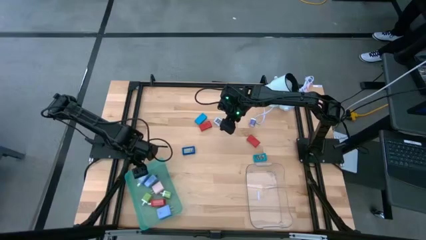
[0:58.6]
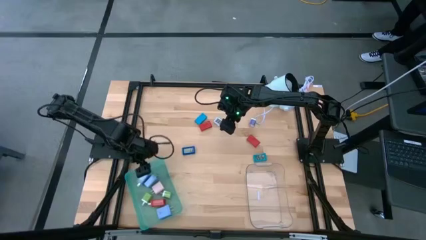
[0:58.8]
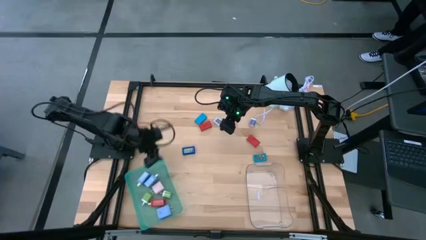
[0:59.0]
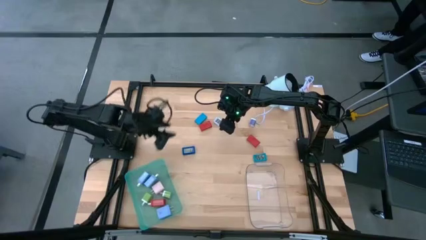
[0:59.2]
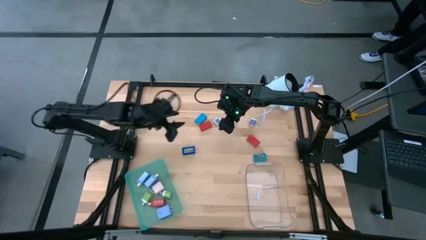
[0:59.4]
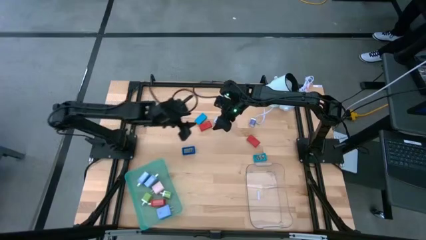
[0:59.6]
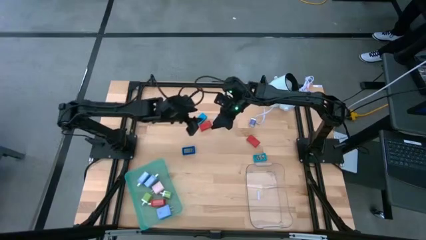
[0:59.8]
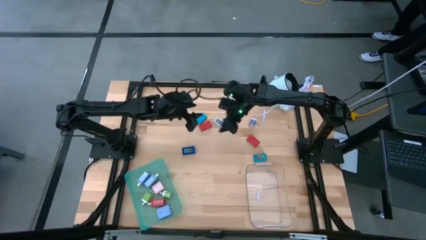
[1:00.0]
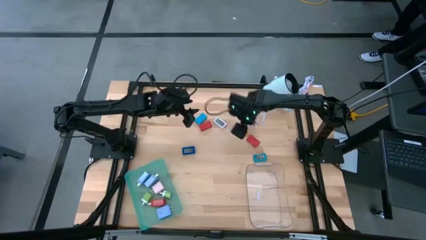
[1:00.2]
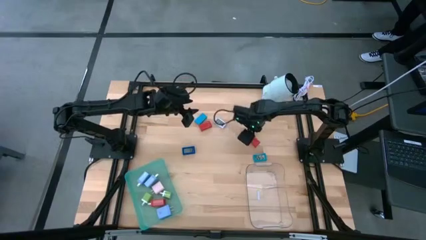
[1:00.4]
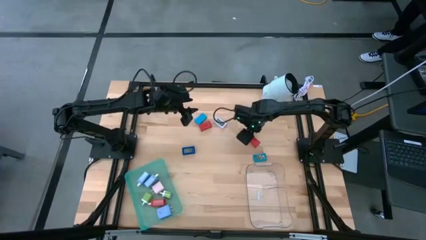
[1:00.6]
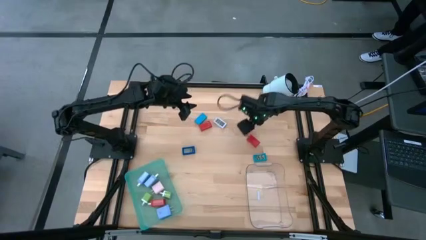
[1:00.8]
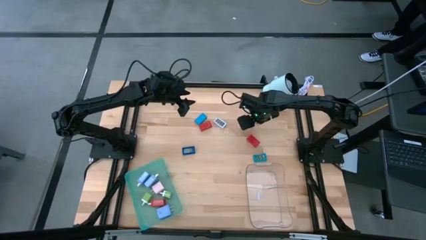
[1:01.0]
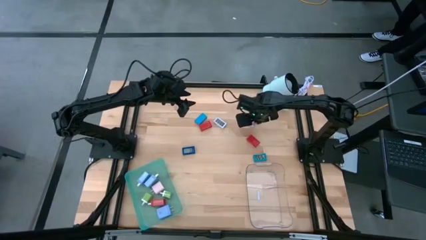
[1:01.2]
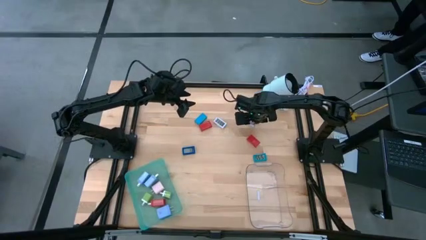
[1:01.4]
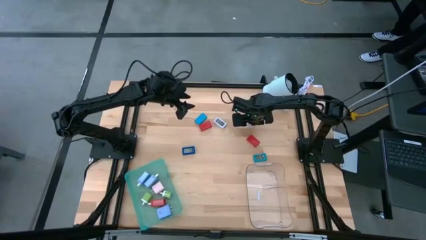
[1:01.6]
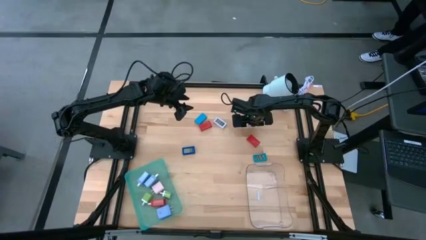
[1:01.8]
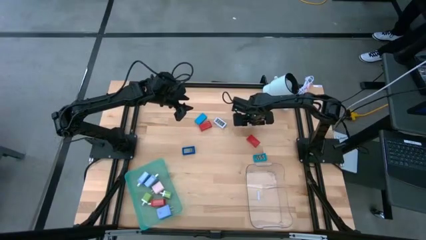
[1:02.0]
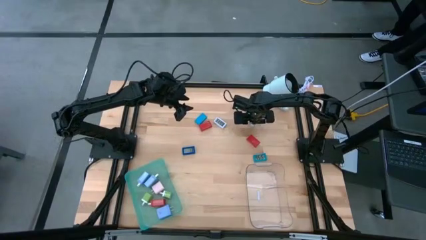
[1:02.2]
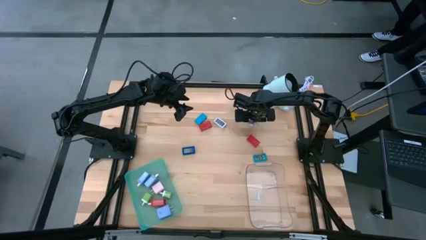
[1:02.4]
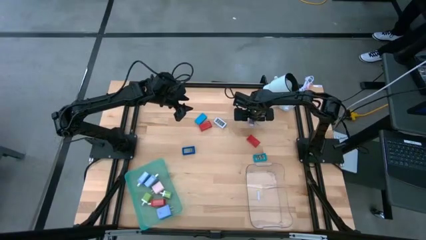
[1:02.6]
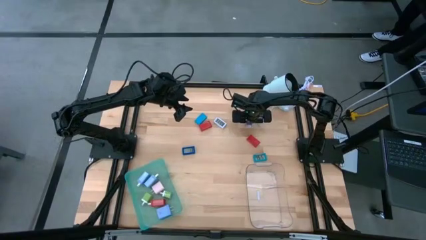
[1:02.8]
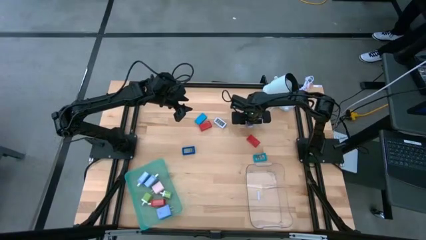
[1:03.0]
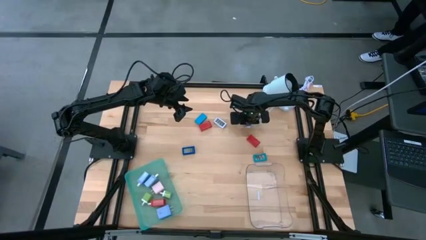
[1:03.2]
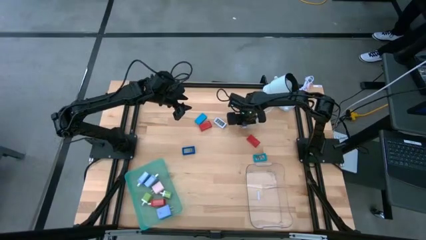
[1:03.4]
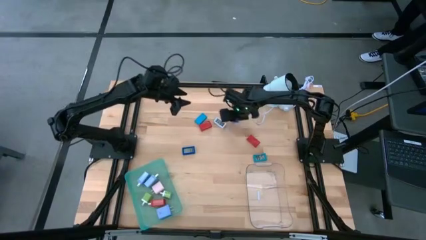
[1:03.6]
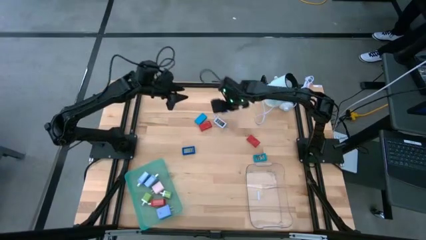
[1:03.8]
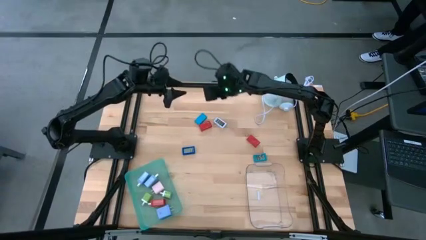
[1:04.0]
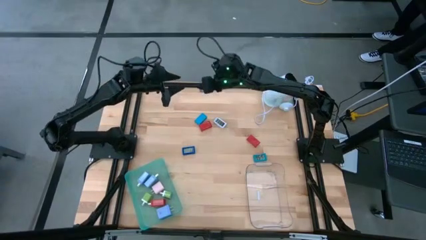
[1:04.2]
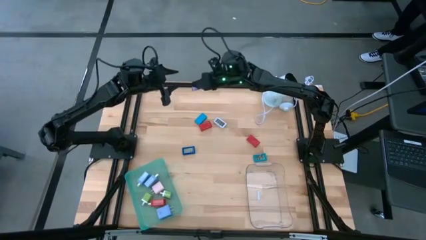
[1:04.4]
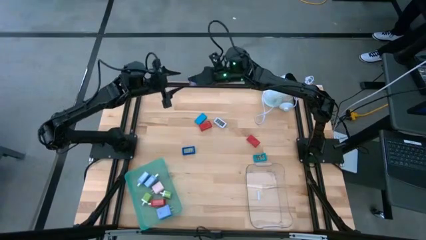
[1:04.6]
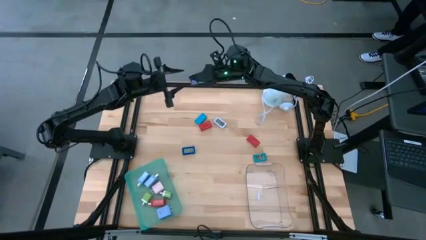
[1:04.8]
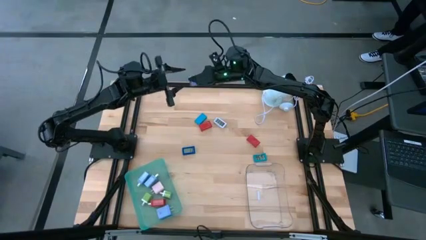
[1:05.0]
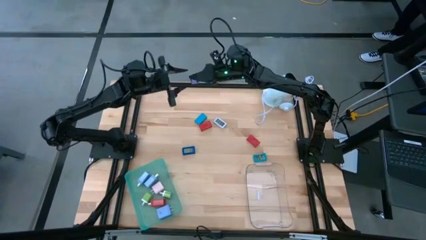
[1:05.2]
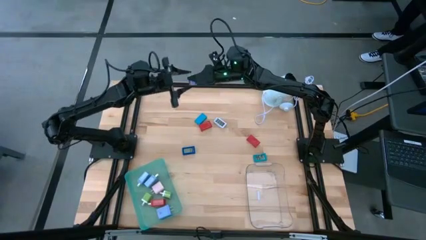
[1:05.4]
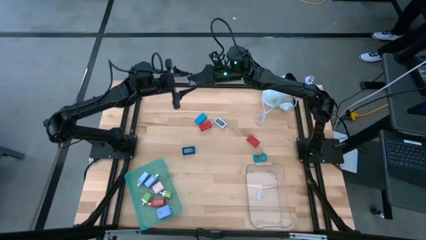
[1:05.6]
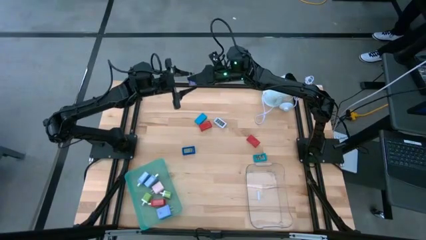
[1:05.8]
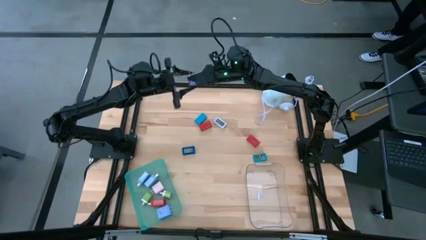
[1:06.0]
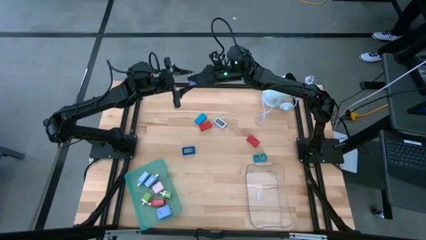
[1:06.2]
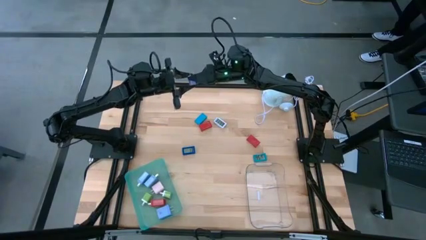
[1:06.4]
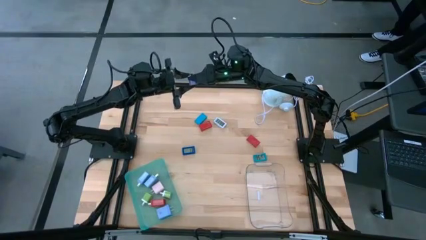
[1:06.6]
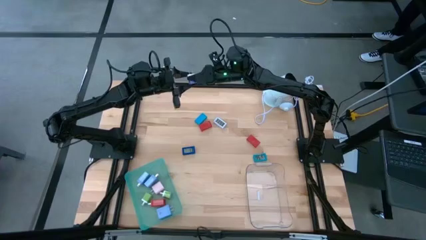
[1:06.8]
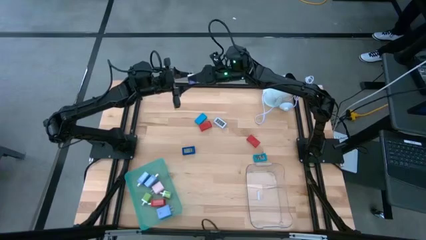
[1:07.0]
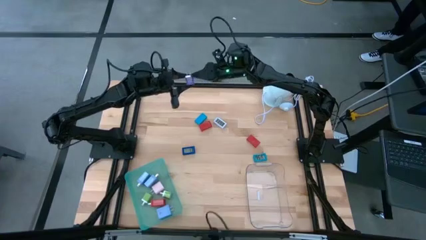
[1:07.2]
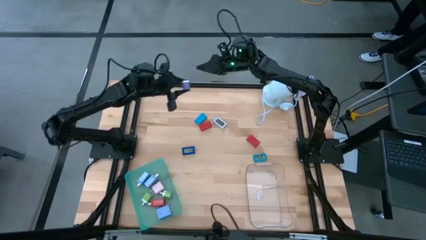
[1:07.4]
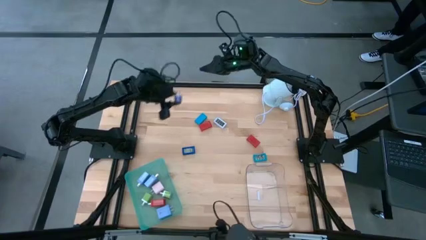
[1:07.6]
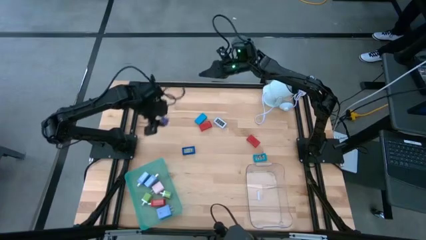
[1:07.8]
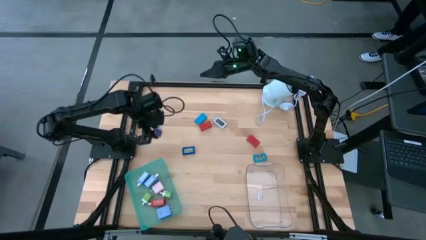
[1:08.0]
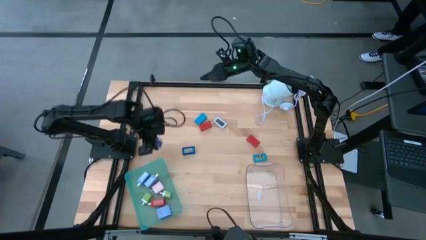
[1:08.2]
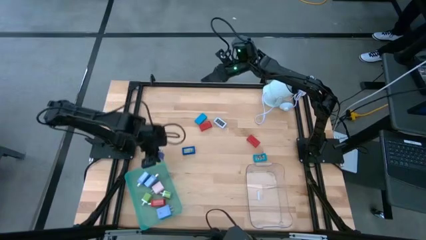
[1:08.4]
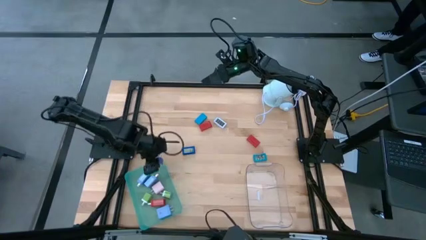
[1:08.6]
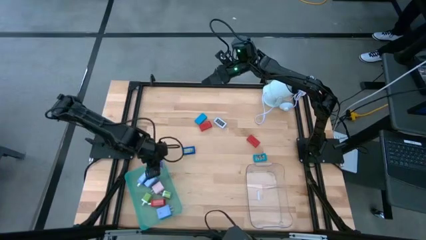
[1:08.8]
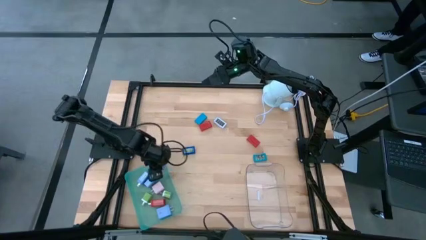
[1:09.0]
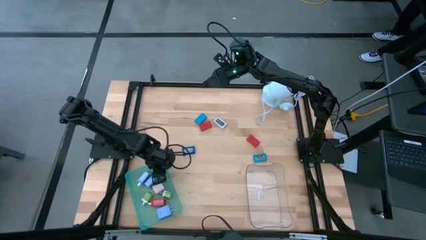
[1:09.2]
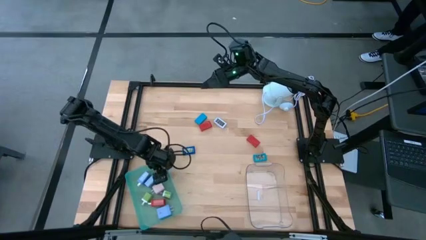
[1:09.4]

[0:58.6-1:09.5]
Task: Pick & Place Office items
Put the purple charger adapter into the blue bin

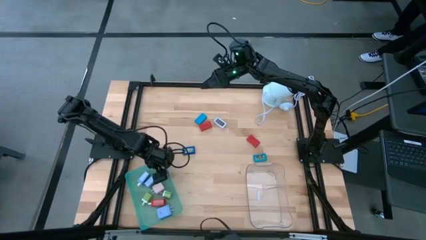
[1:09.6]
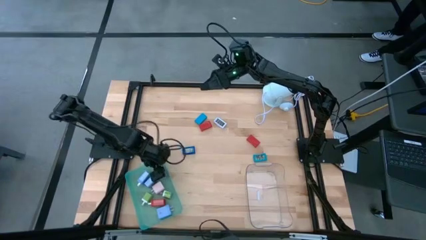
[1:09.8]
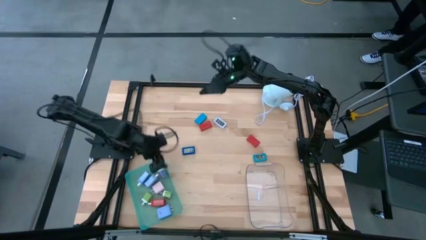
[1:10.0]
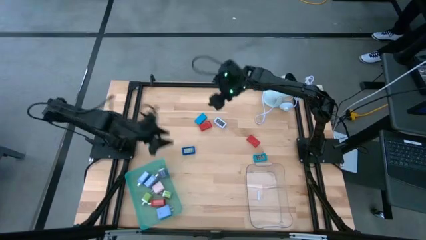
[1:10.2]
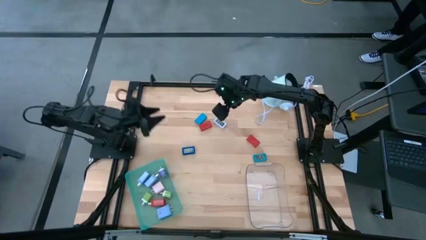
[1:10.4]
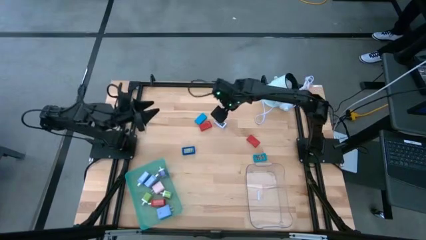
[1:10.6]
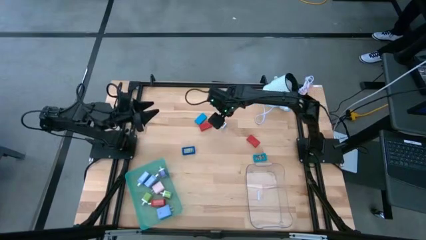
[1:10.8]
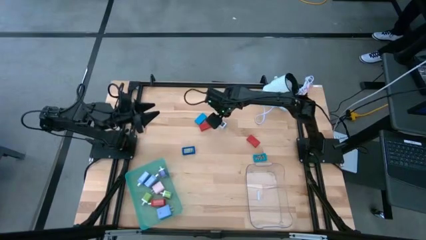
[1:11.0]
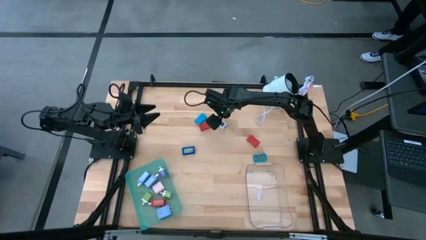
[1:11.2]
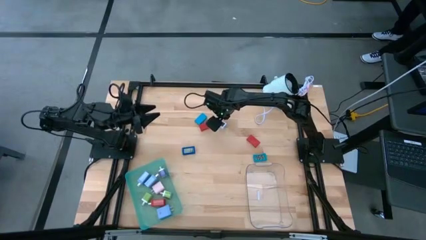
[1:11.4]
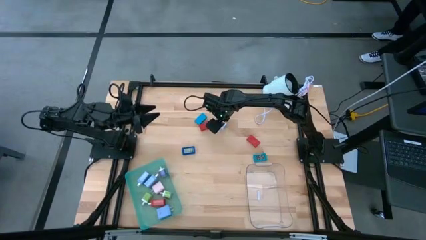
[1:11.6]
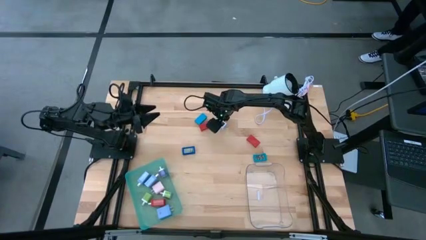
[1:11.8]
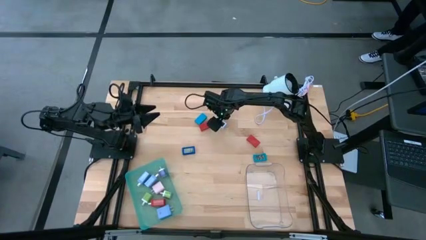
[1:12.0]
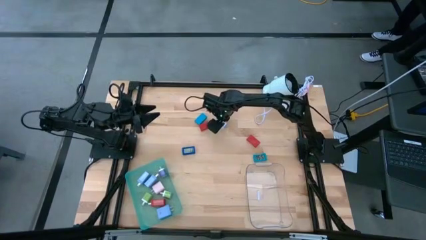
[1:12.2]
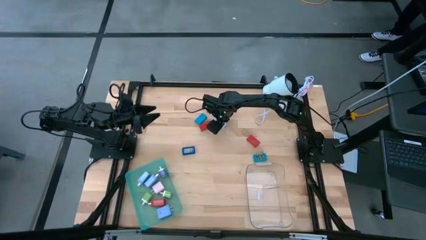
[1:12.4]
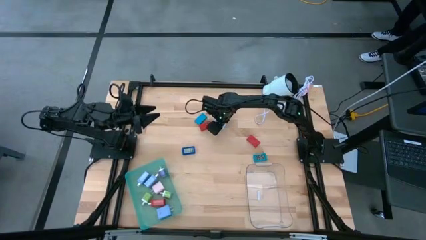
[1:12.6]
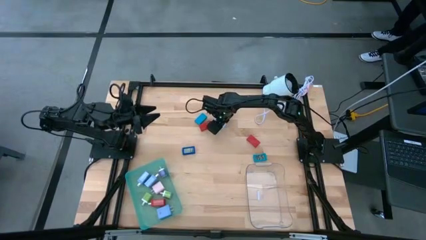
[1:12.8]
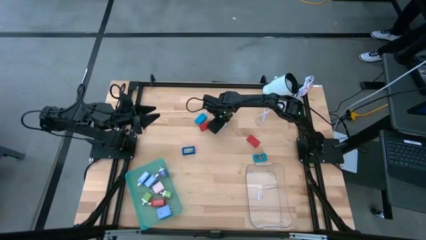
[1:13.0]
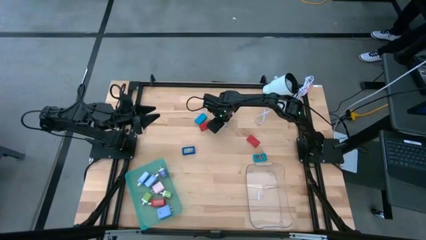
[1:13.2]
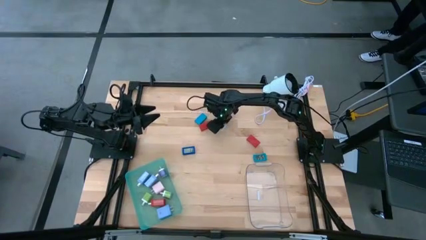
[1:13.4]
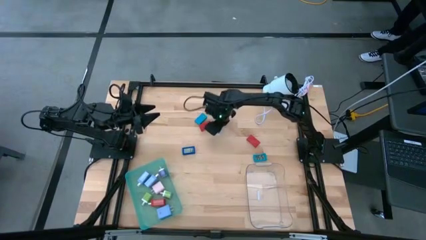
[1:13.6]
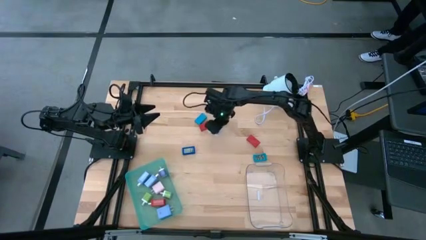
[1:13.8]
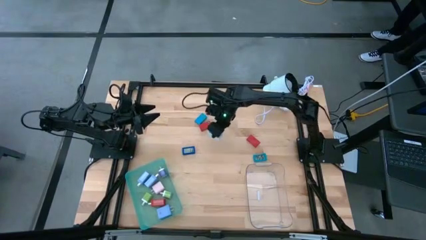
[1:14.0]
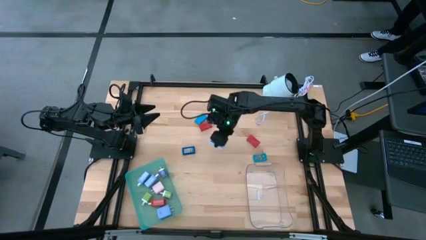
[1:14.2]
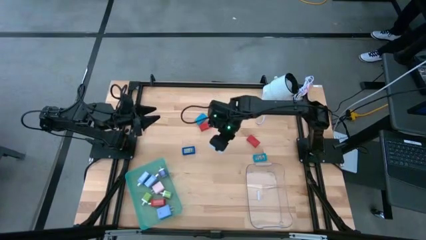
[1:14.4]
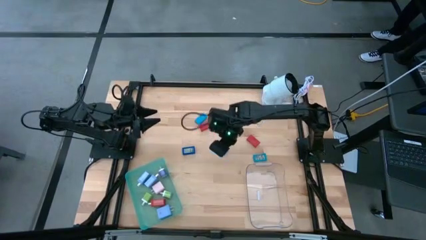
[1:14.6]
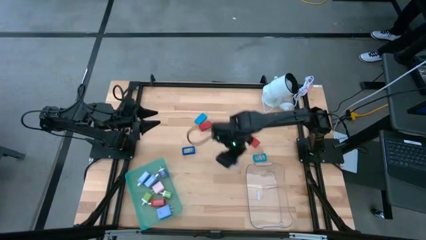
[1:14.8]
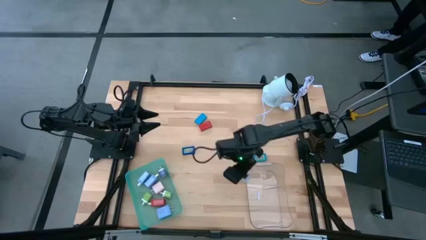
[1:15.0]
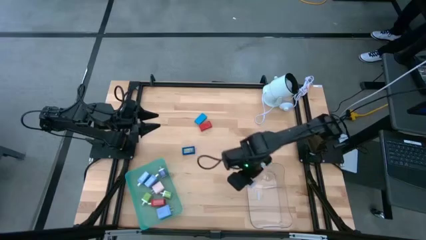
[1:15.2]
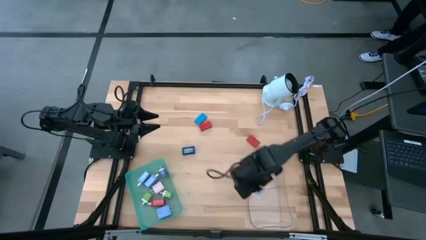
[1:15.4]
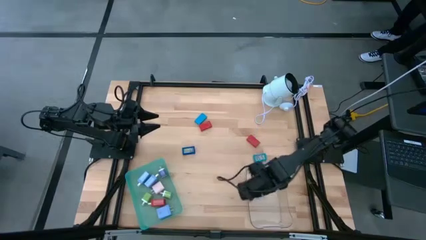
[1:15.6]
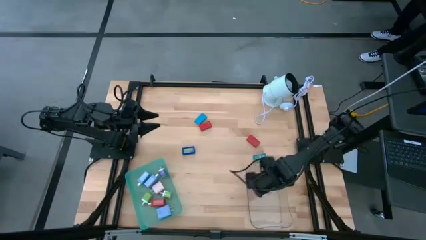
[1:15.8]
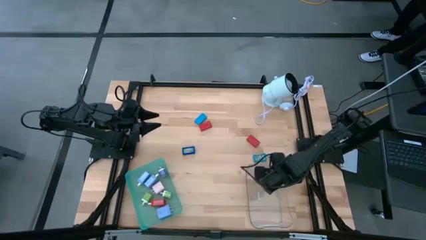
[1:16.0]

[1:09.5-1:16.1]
Put the white digital clock into the transparent bin
